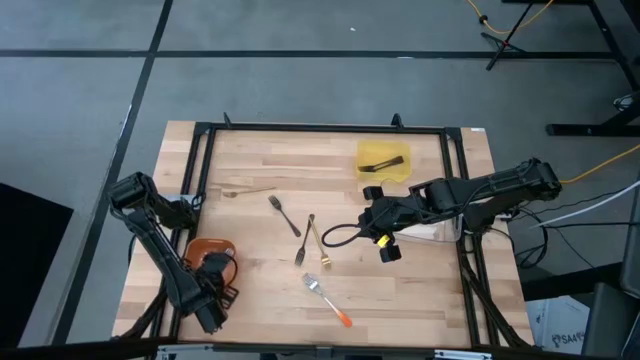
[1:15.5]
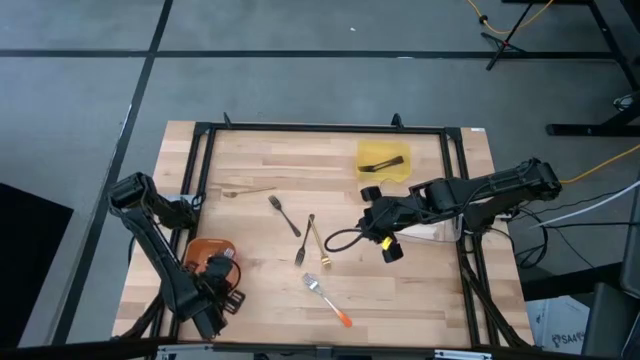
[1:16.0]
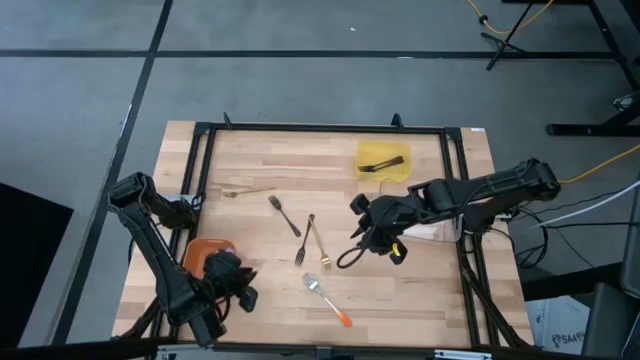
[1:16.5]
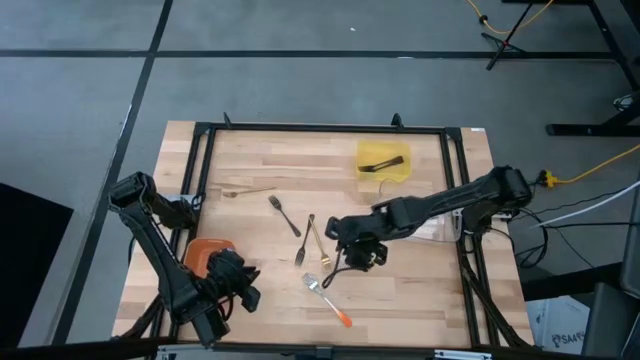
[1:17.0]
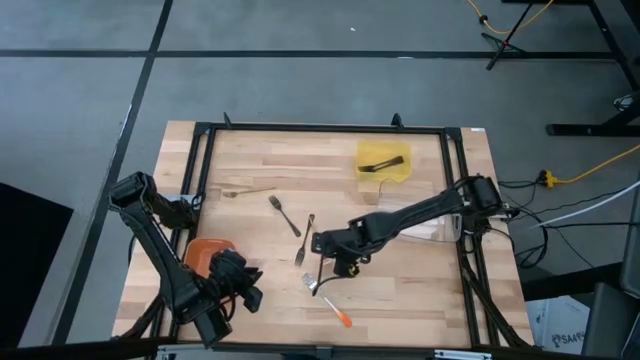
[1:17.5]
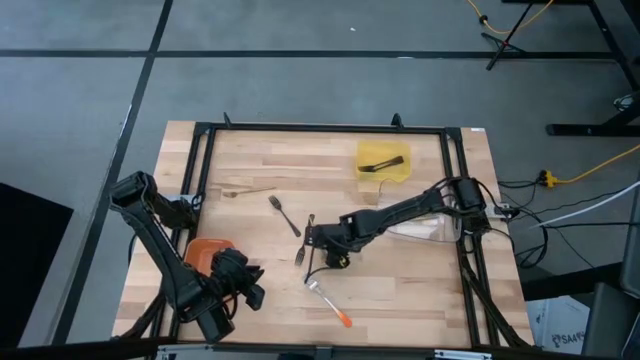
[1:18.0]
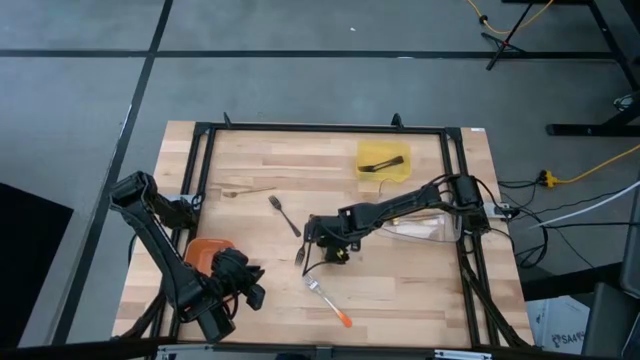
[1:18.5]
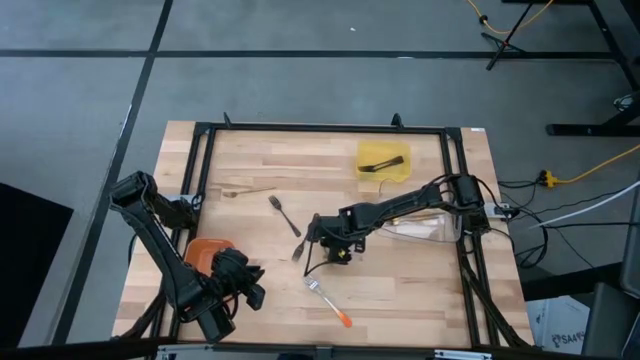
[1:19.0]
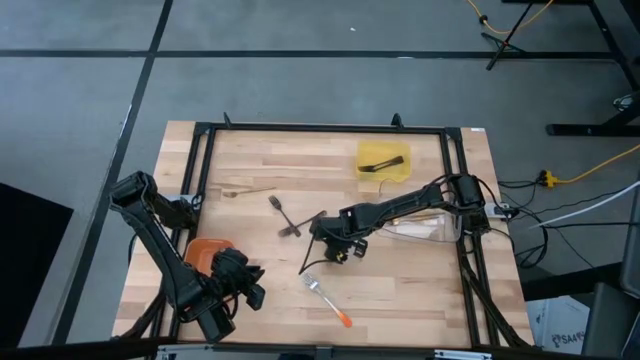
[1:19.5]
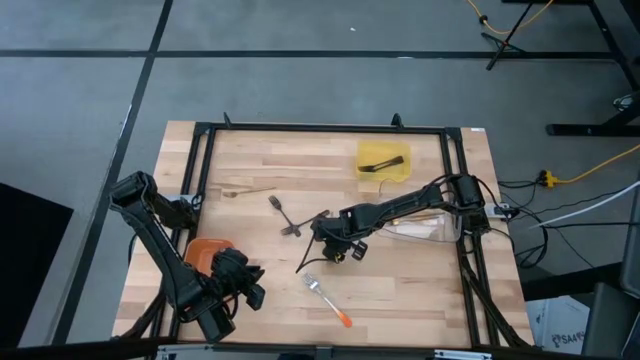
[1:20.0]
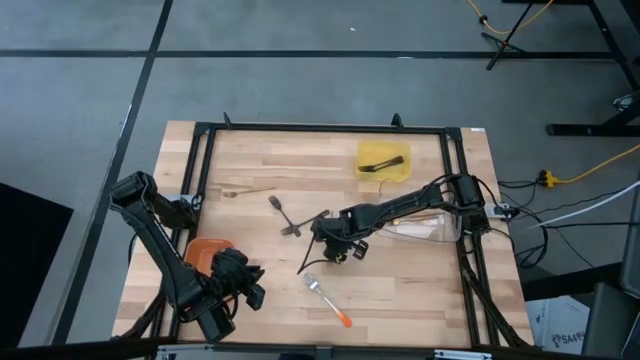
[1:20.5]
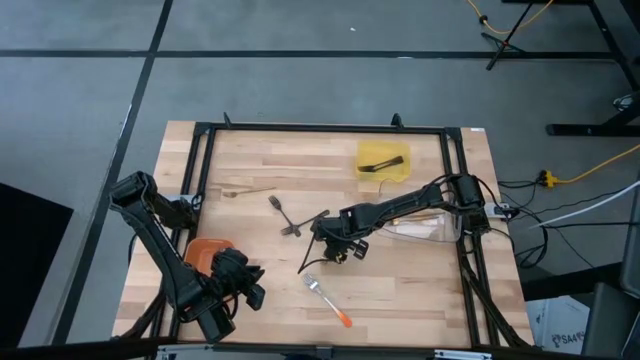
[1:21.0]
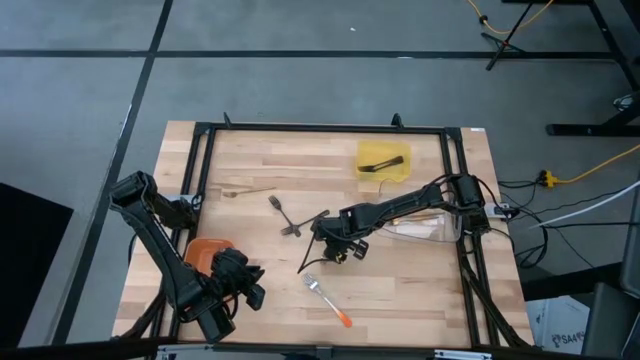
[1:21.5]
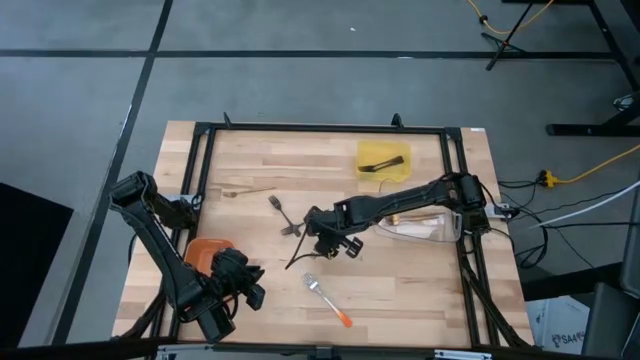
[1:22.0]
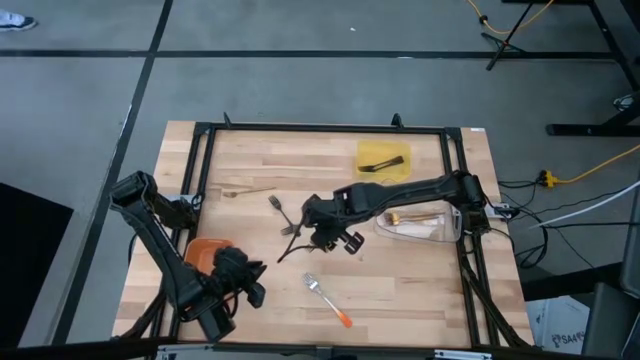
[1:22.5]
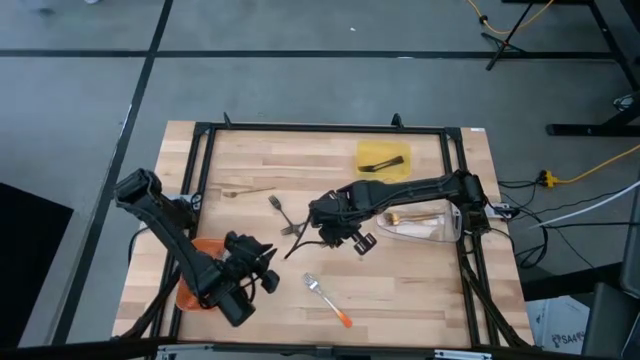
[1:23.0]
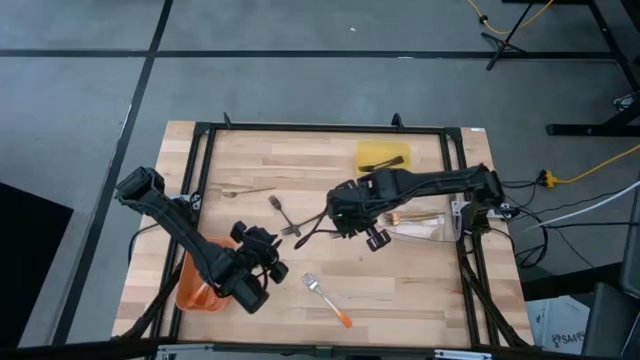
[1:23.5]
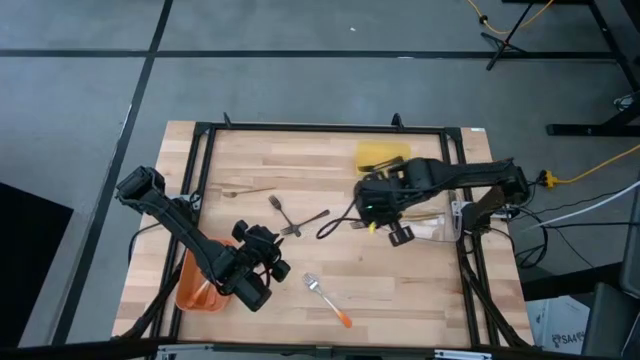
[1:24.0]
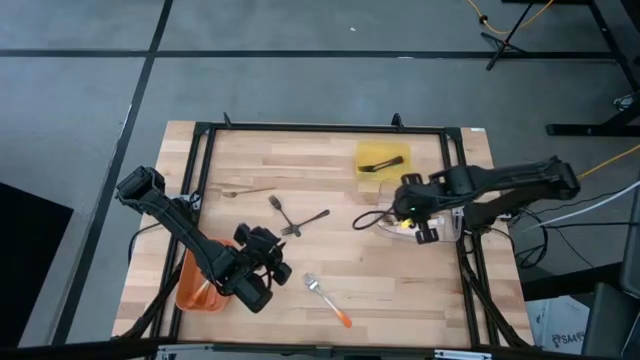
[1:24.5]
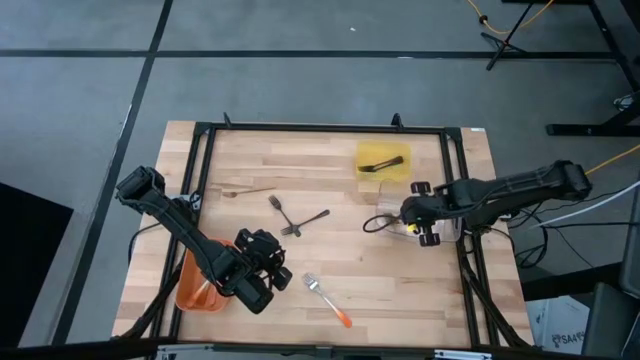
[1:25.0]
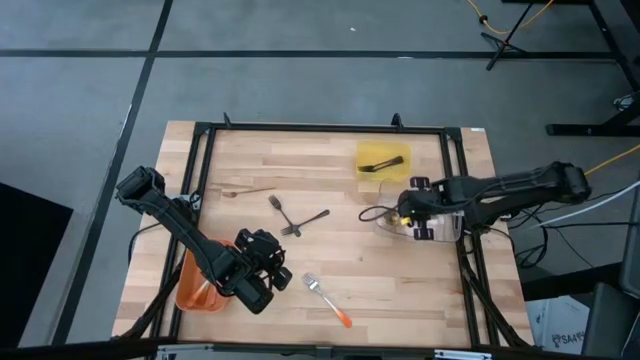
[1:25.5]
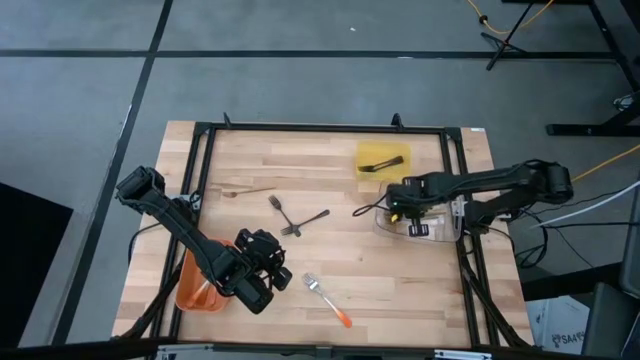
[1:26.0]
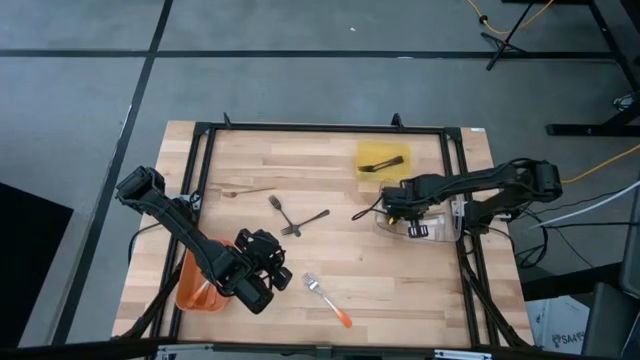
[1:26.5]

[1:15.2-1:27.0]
Task: Sort silverware by color (type)
Put the gold fork into the transparent bin

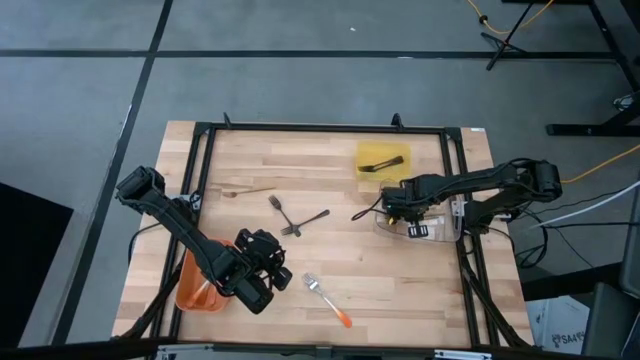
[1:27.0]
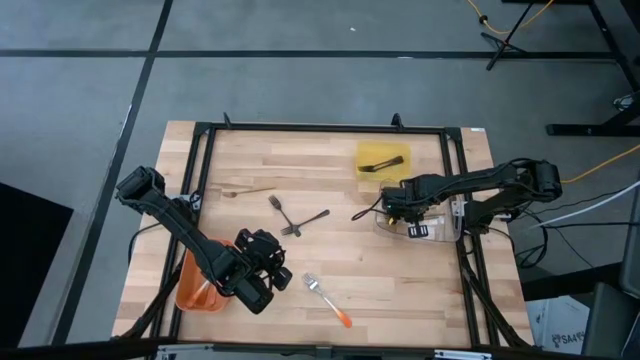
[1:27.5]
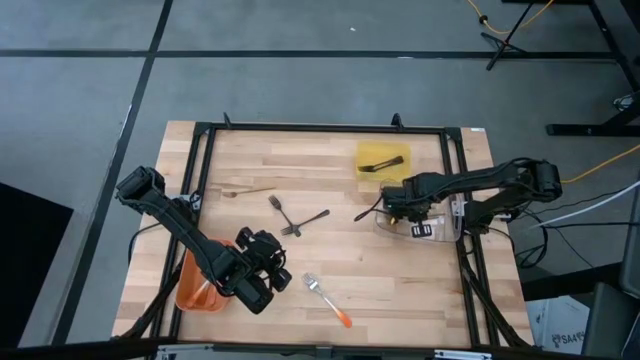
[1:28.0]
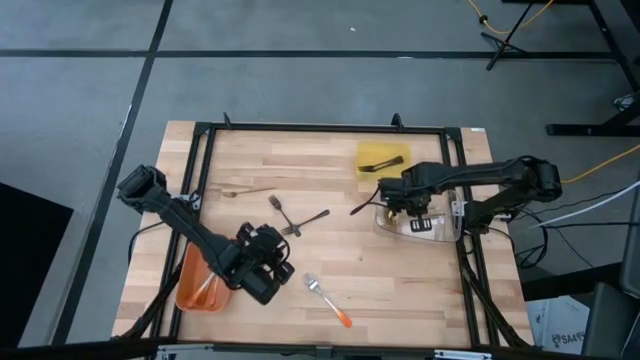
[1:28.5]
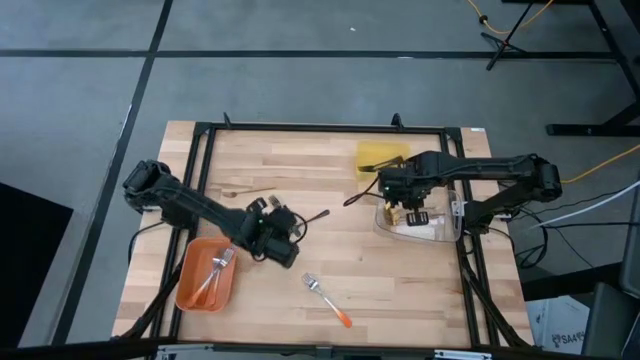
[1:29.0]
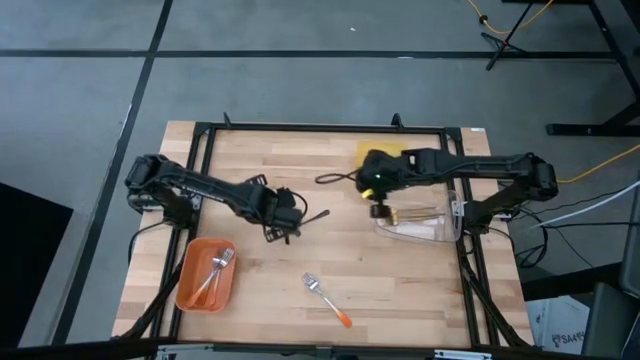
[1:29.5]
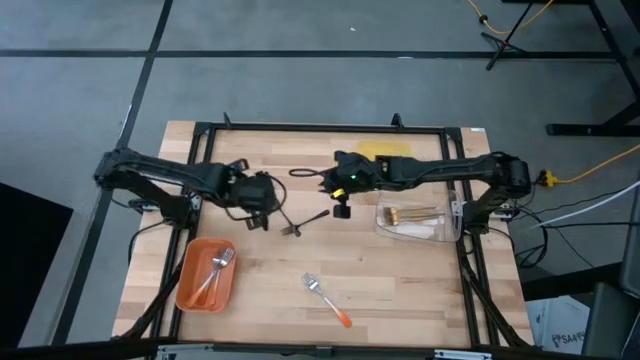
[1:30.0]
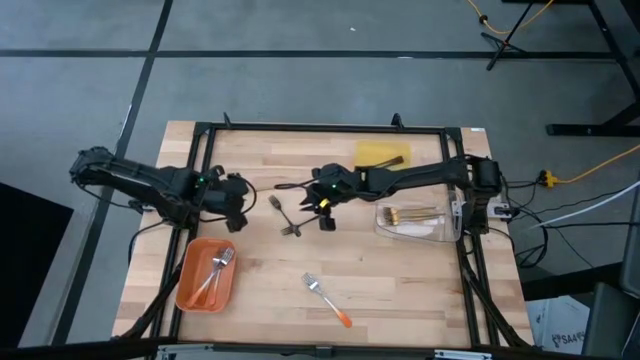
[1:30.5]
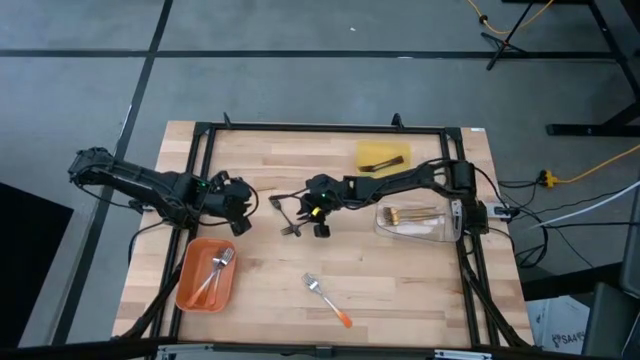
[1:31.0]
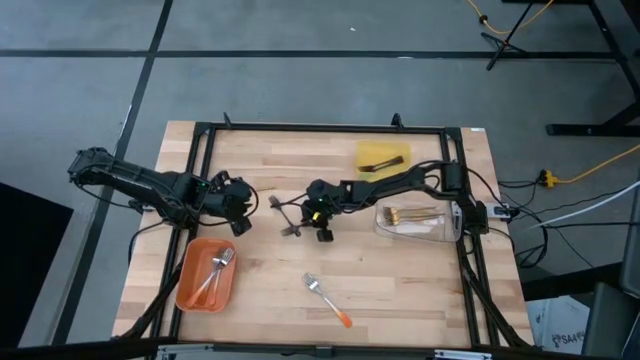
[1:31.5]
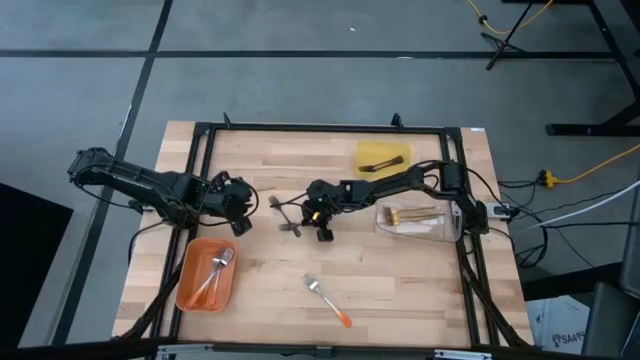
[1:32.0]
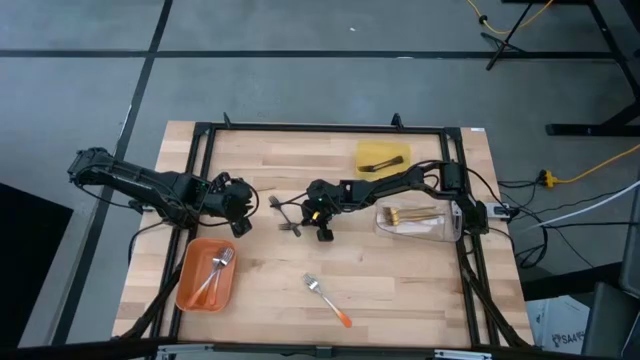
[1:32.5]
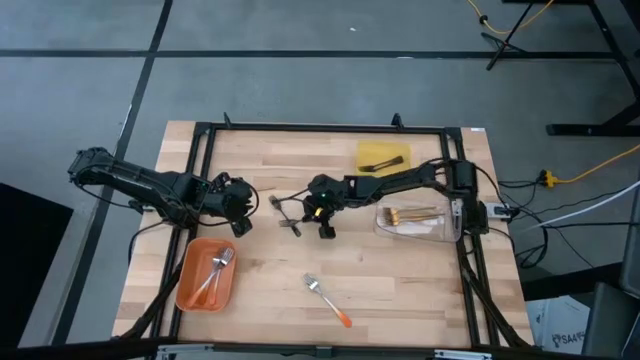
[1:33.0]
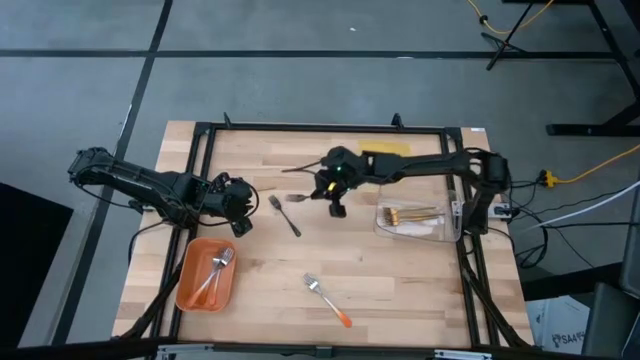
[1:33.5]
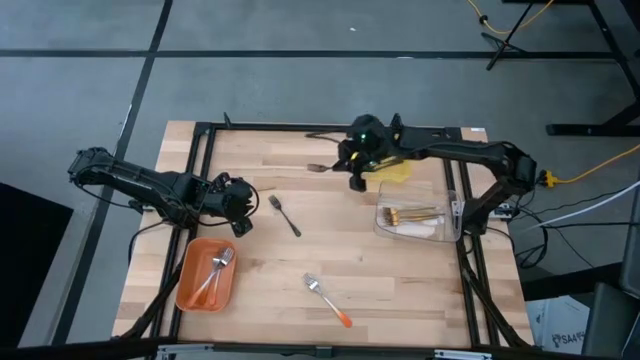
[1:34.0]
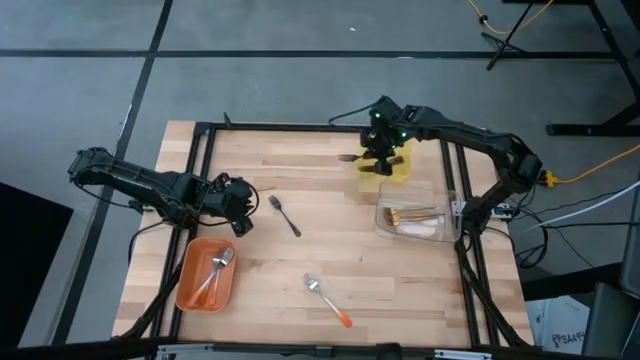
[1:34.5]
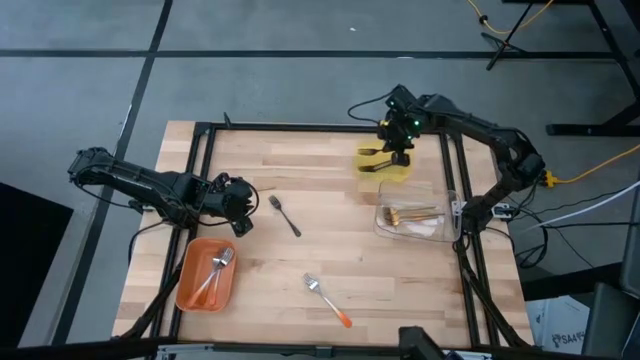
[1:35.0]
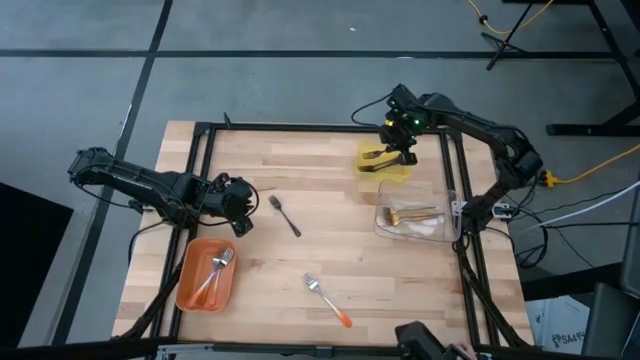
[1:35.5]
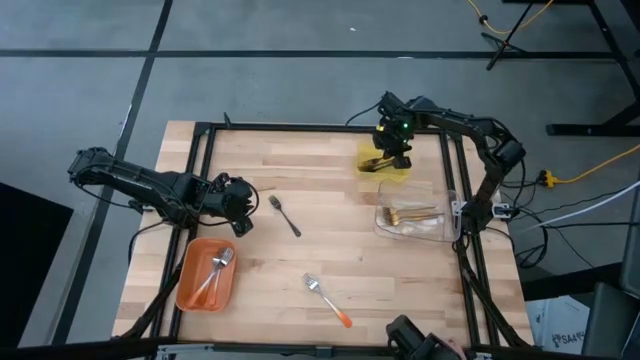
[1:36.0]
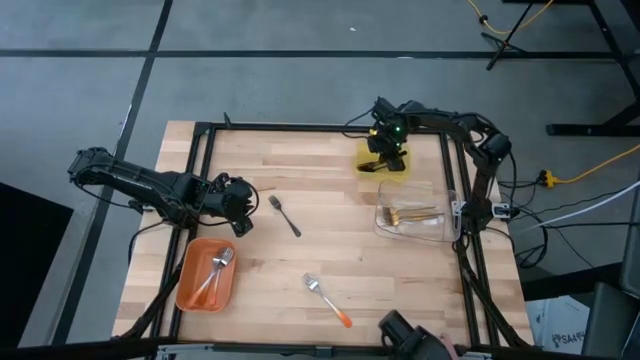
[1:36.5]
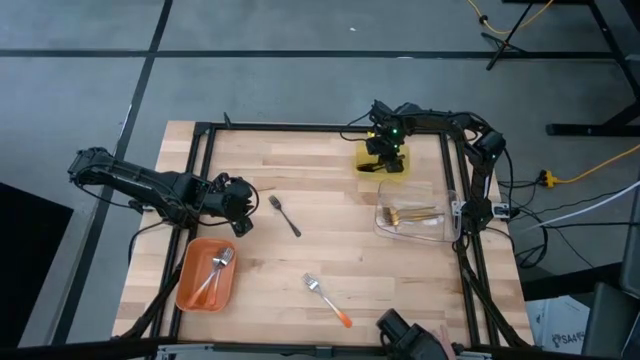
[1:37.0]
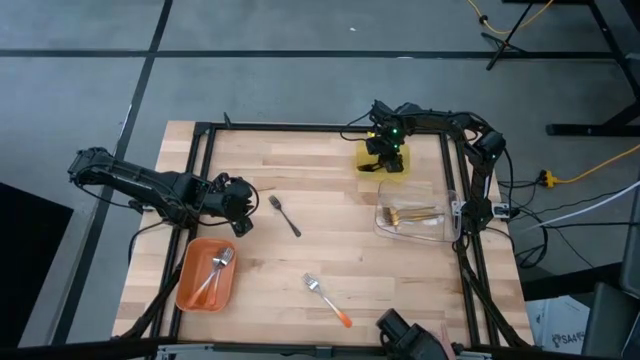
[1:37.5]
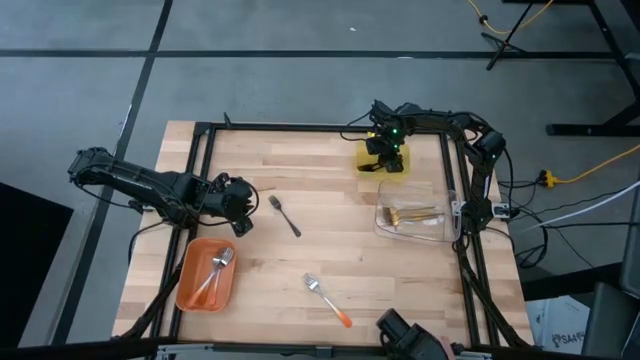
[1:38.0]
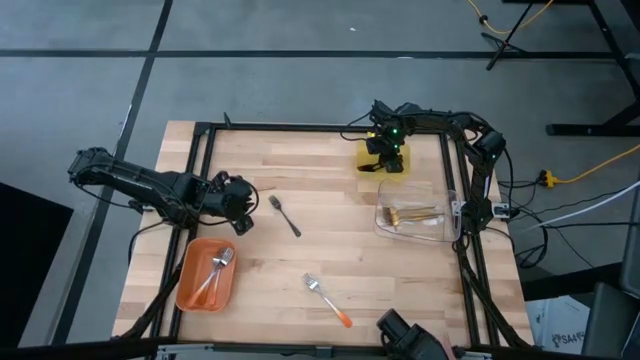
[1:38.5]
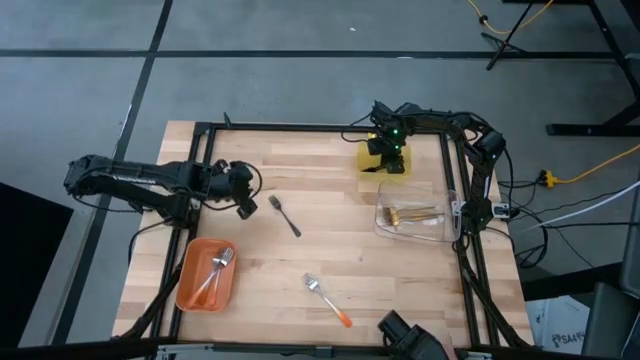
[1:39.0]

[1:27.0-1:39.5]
Put the black fork into the yellow bin
